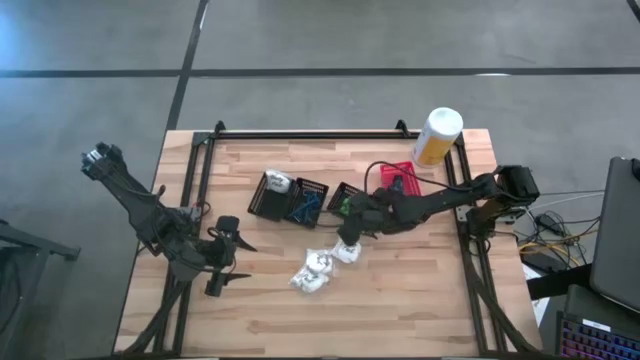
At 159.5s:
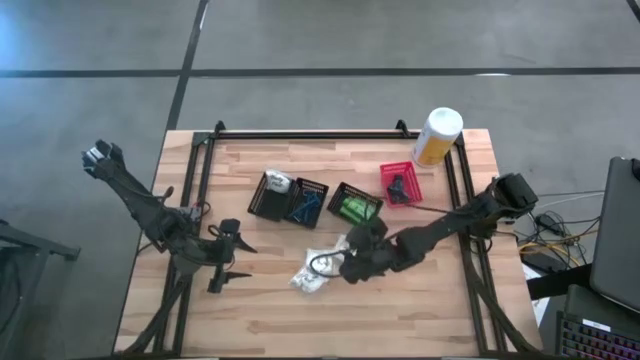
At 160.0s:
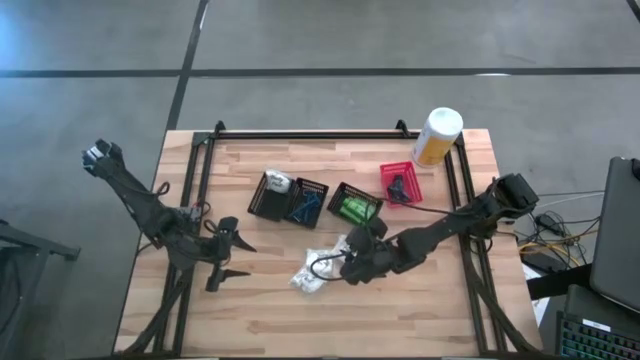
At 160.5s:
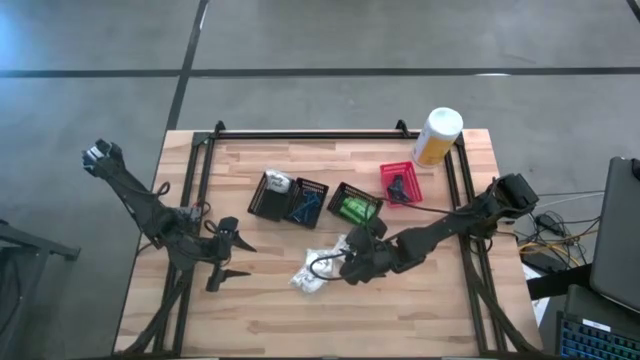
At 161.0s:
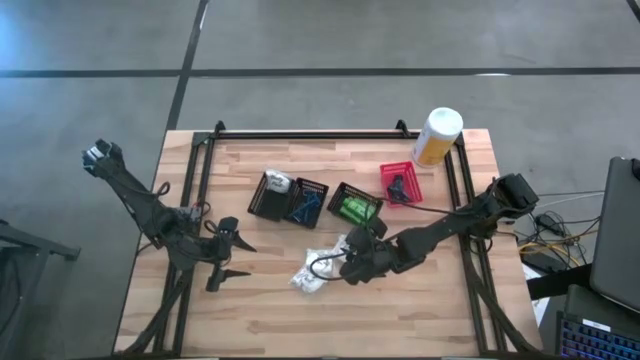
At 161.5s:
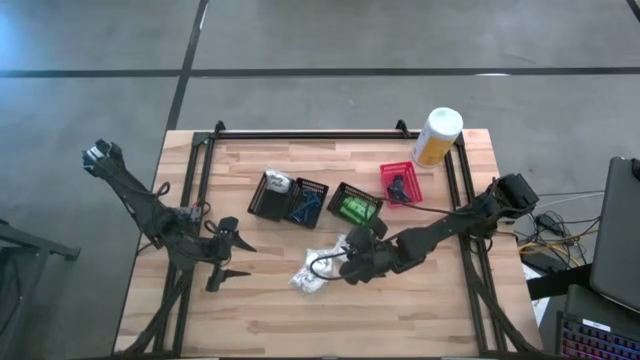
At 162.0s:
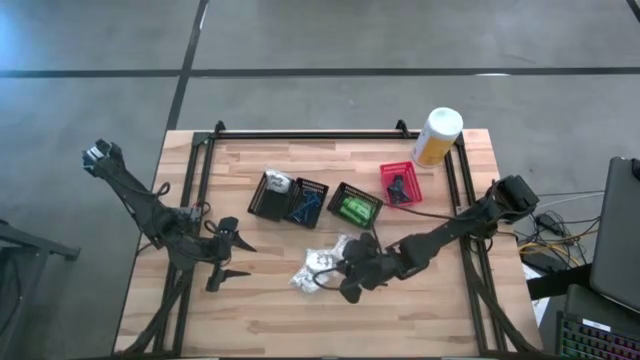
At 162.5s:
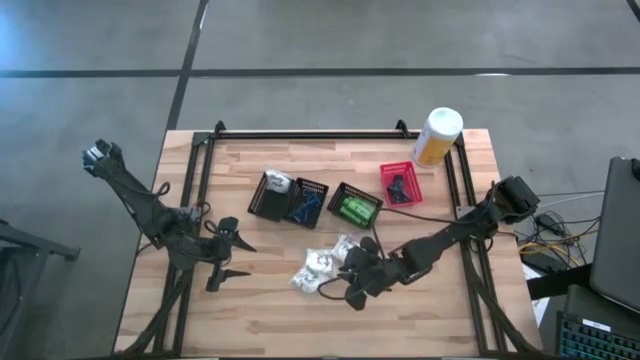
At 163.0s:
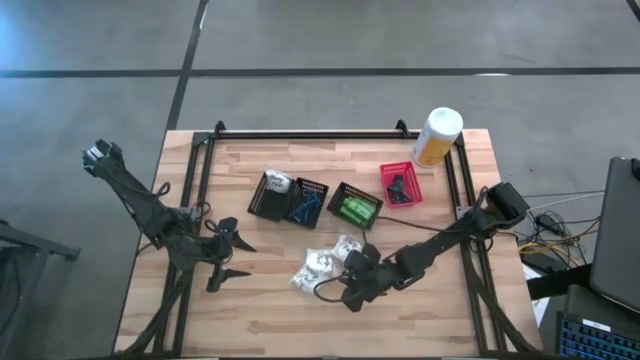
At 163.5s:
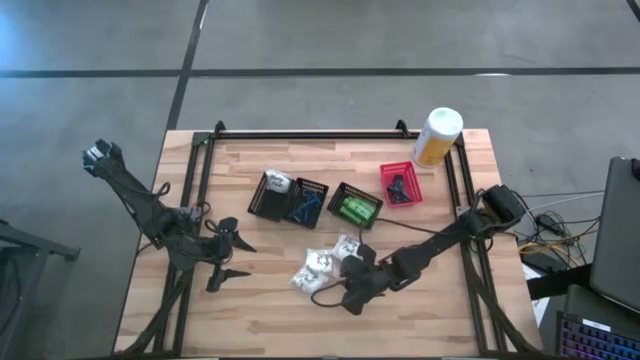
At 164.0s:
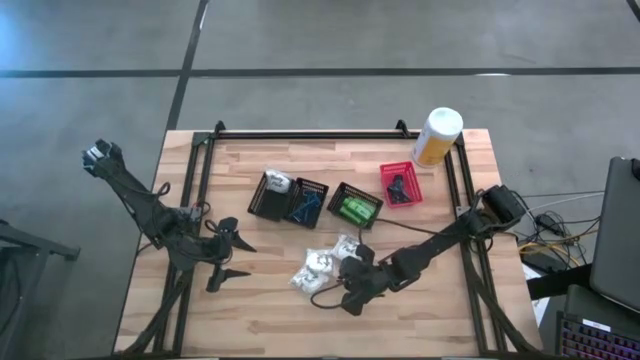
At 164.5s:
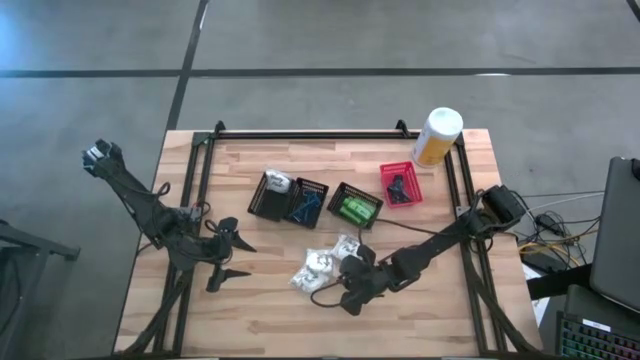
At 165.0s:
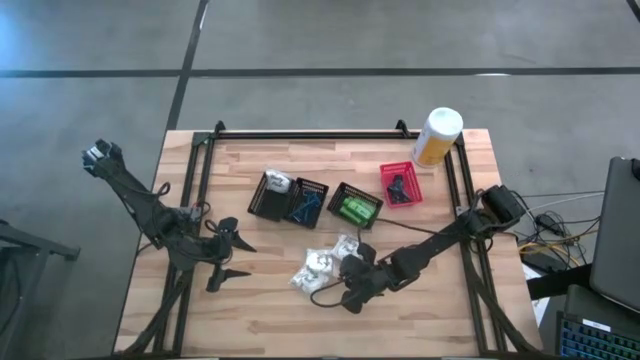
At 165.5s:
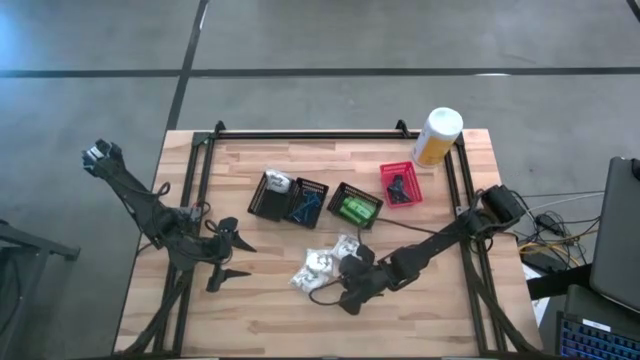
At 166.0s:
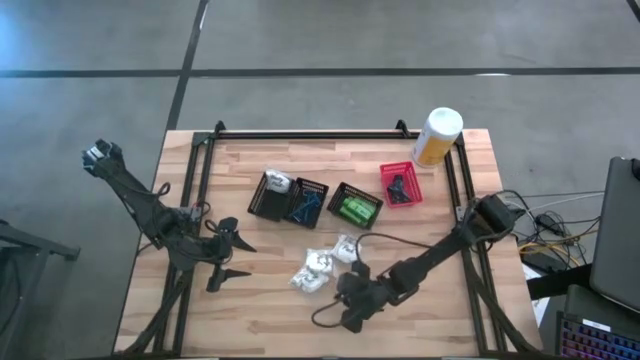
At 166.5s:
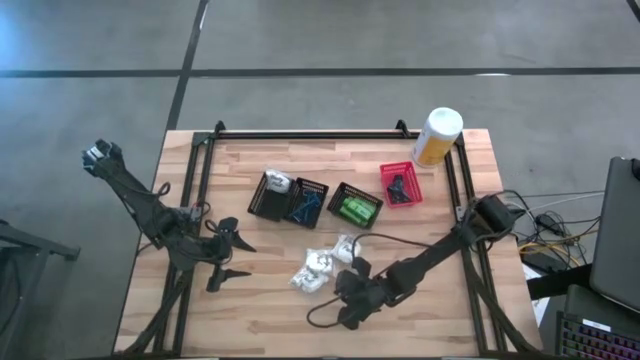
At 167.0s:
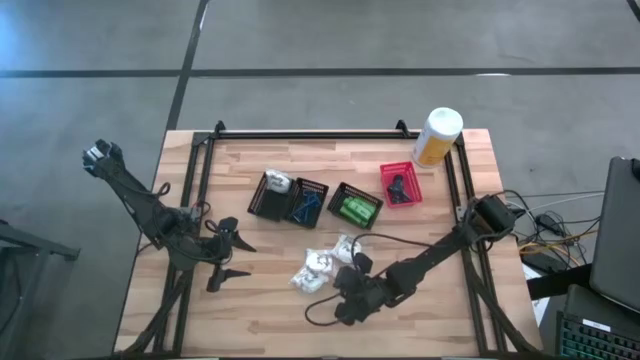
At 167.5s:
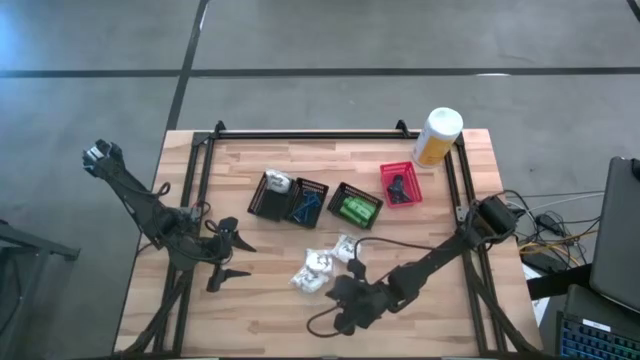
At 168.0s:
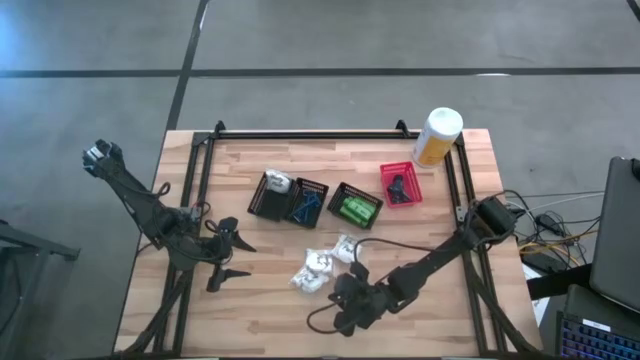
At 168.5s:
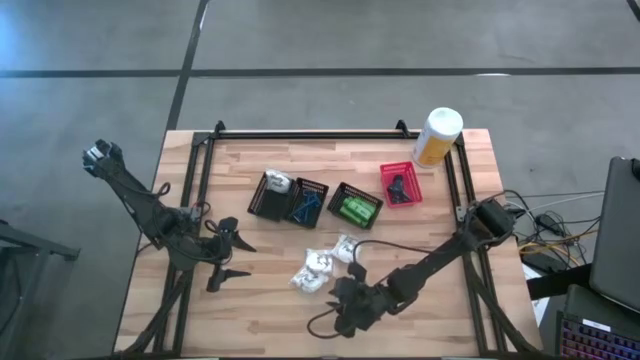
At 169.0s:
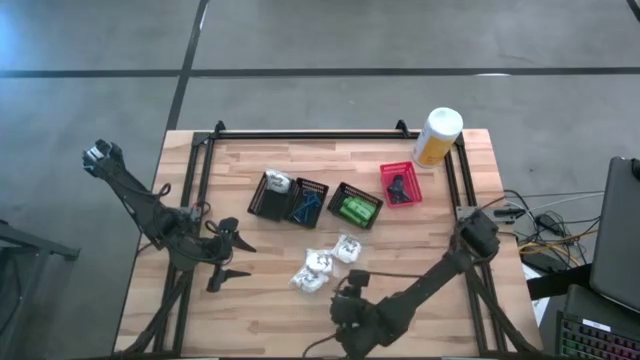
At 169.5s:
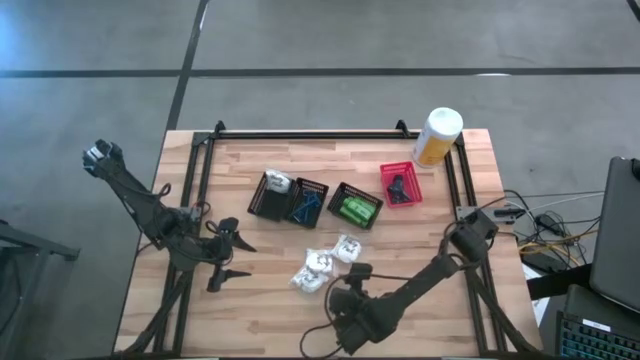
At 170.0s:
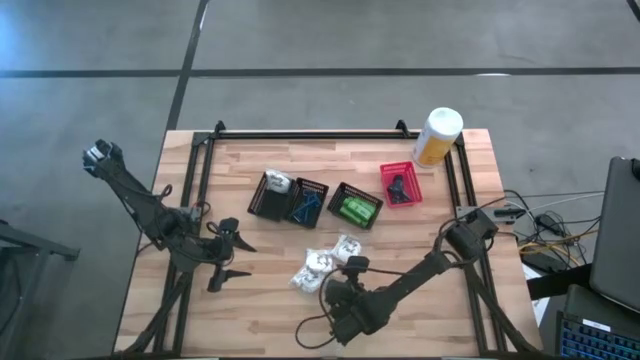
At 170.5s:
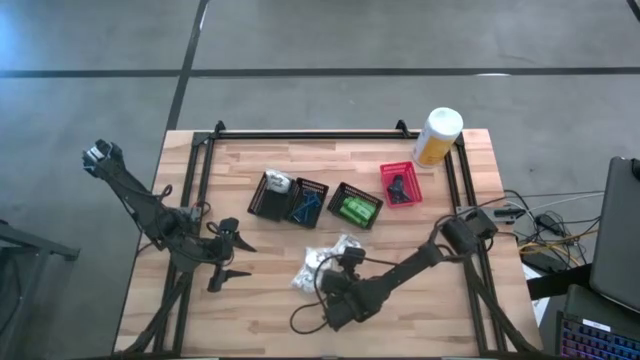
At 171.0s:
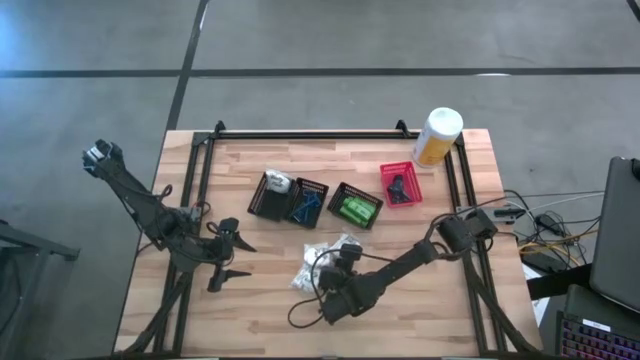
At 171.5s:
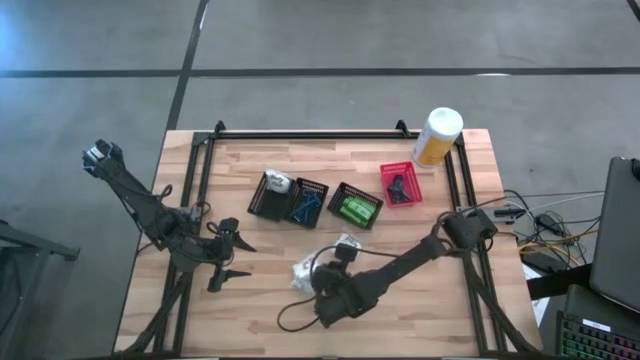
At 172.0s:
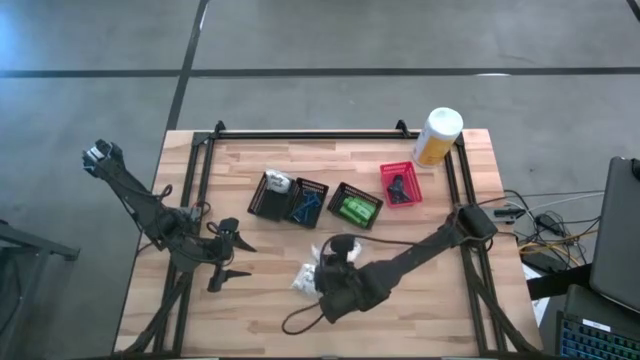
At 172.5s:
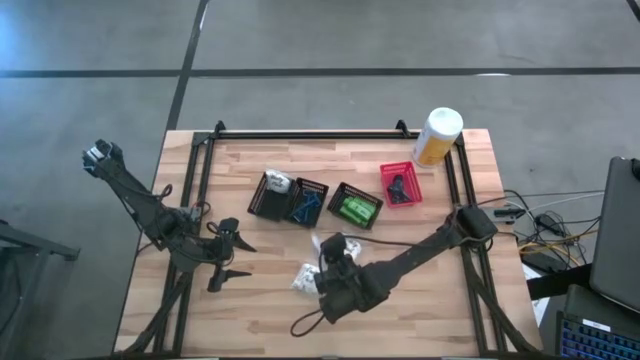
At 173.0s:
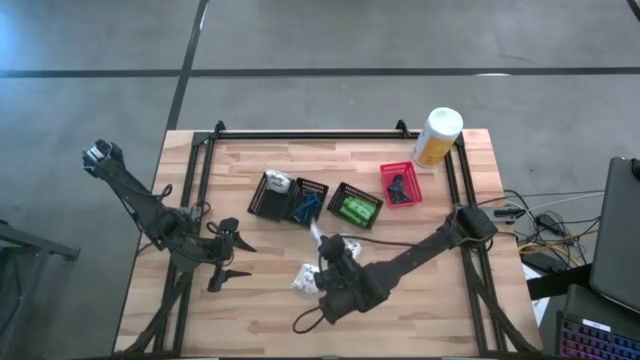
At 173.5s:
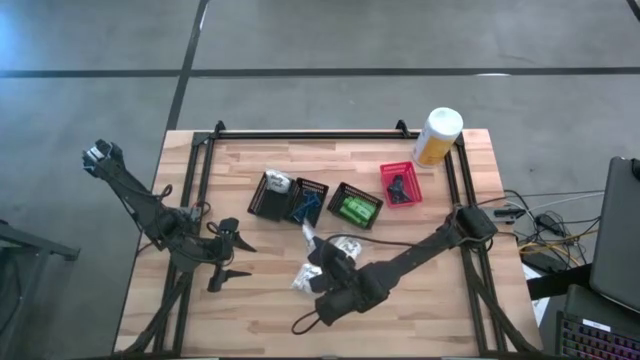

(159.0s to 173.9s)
Task: Pick & Place Travel size toiletries
Put the center vanity pack into the left black bin

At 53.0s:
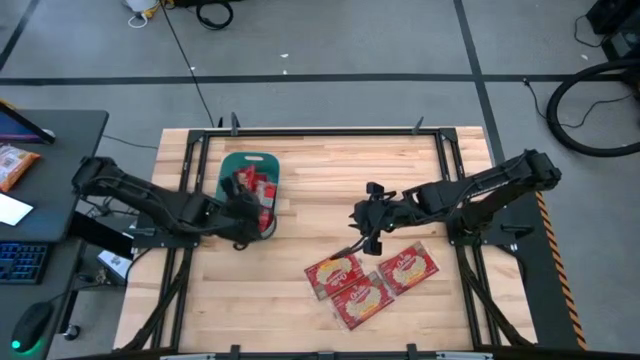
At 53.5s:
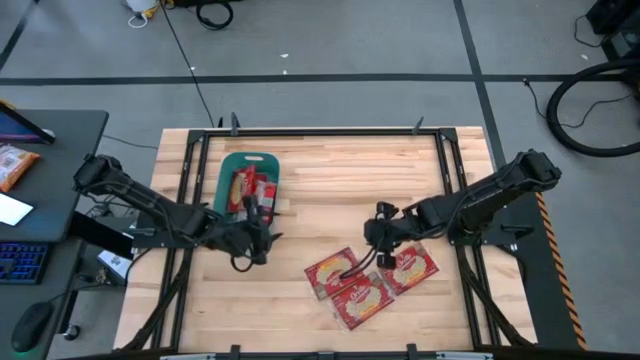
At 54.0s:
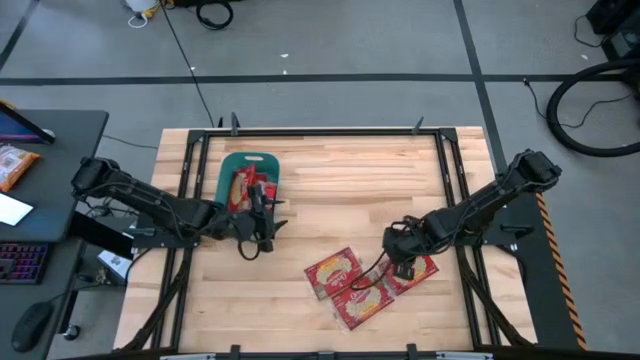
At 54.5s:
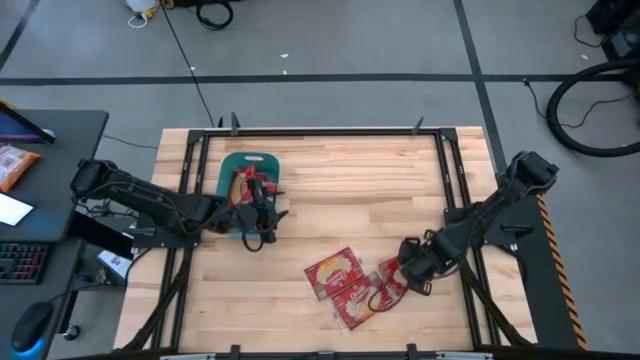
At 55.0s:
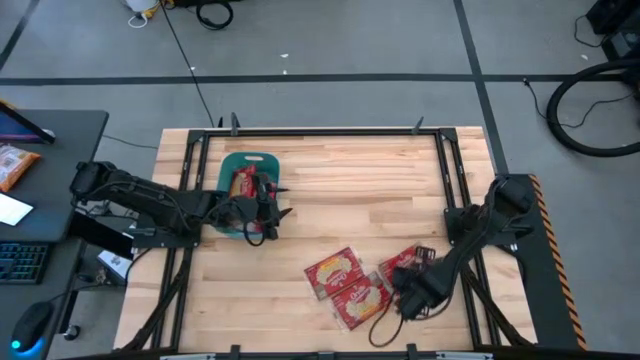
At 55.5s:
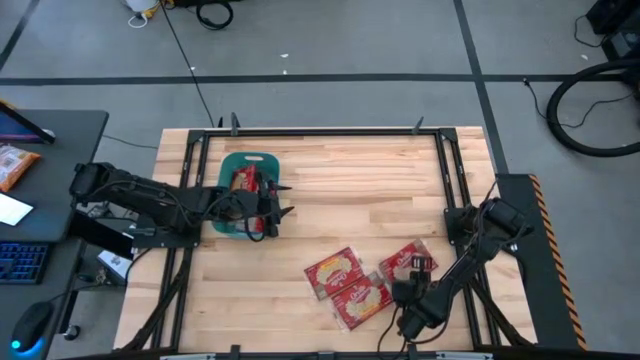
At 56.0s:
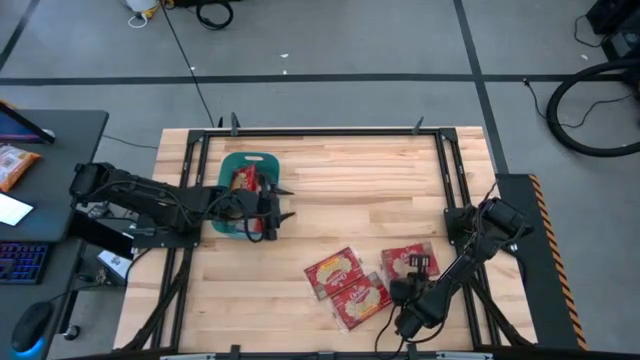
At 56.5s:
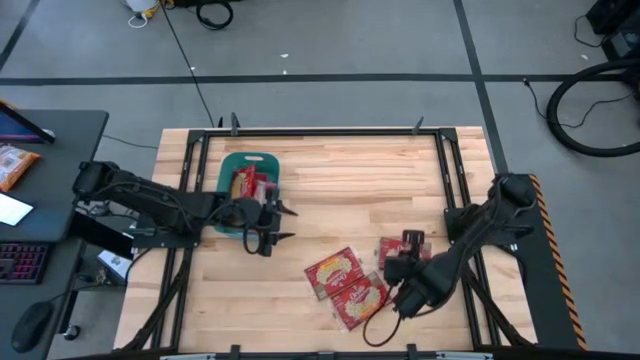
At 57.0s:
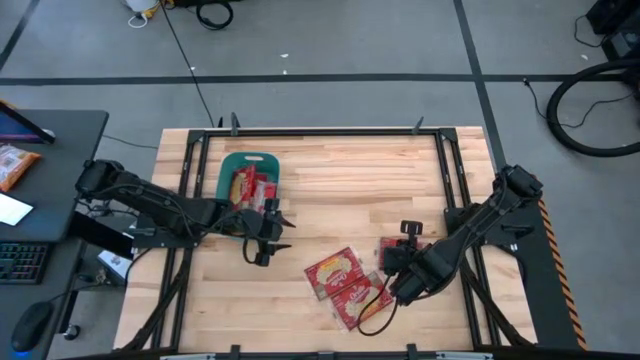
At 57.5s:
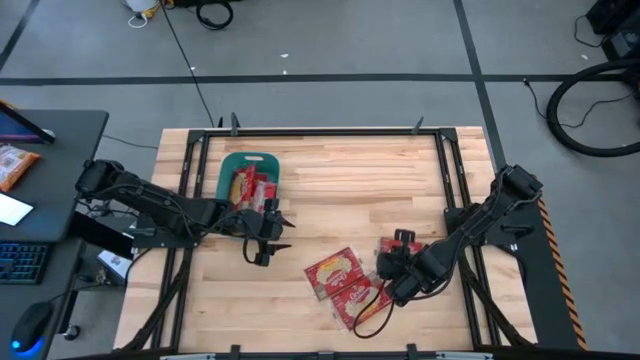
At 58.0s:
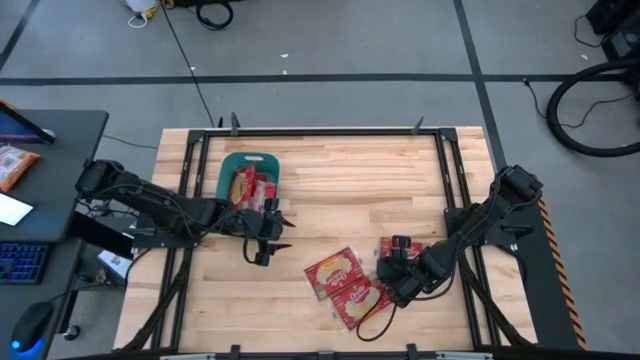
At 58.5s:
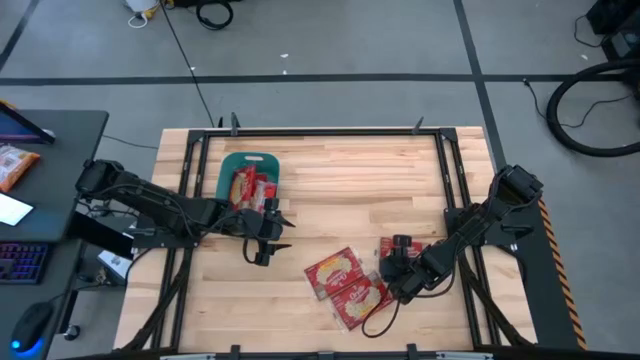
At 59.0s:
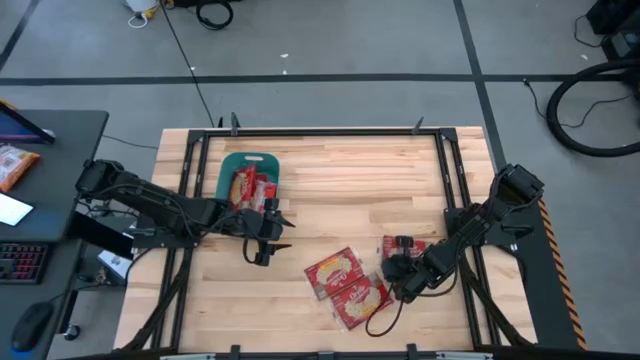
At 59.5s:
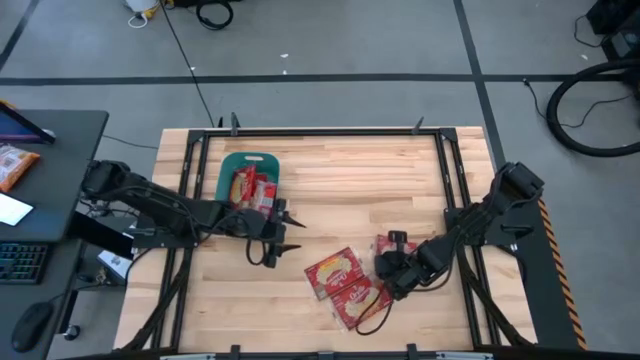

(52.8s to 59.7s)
Task: Sort popcorn bags into baskets
Put the red popcorn bag into the green bin
